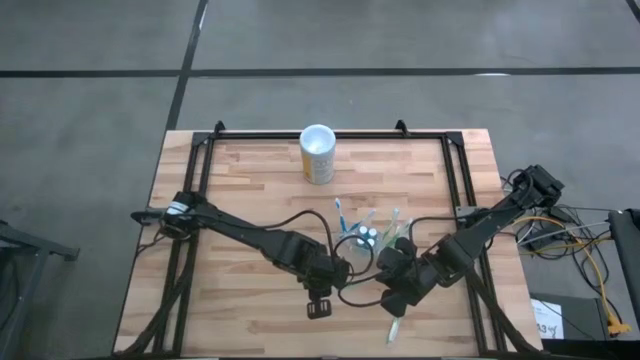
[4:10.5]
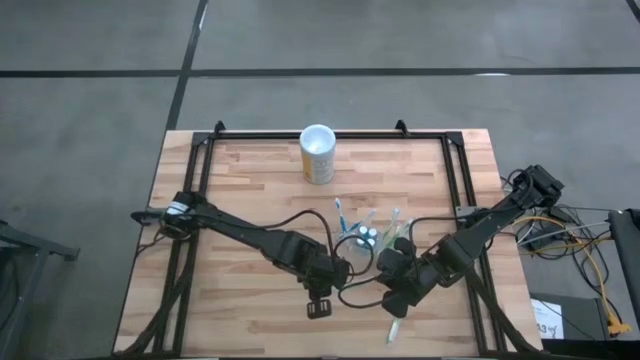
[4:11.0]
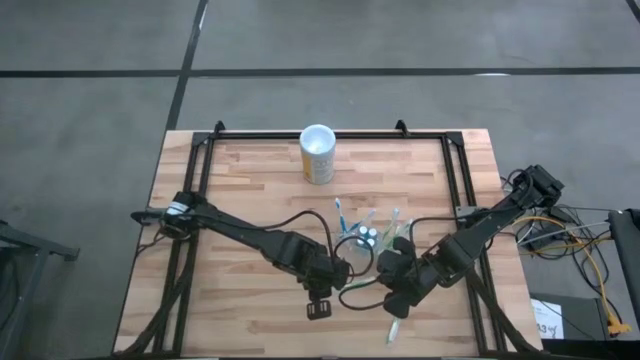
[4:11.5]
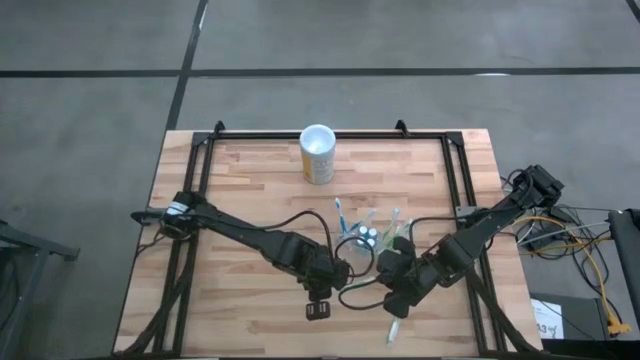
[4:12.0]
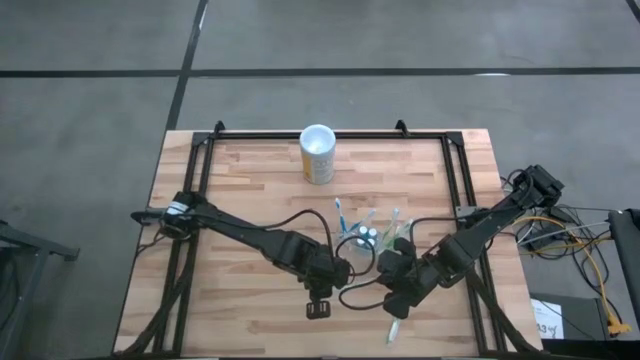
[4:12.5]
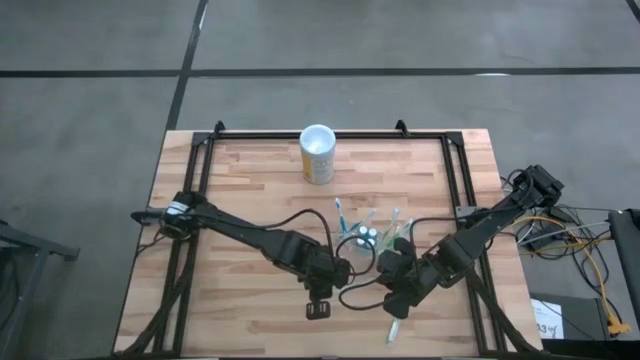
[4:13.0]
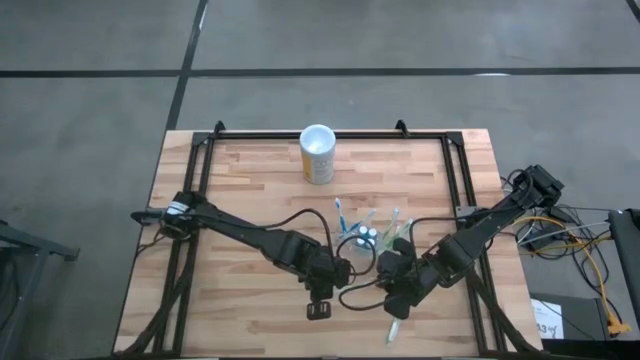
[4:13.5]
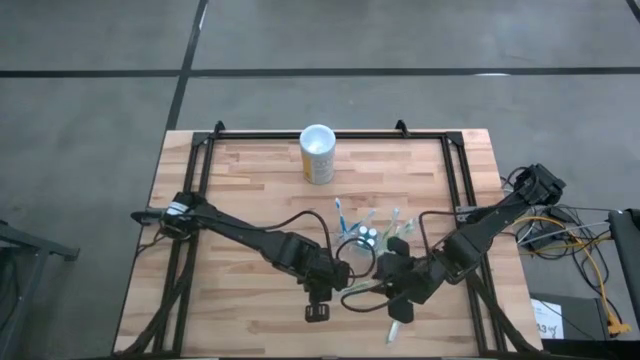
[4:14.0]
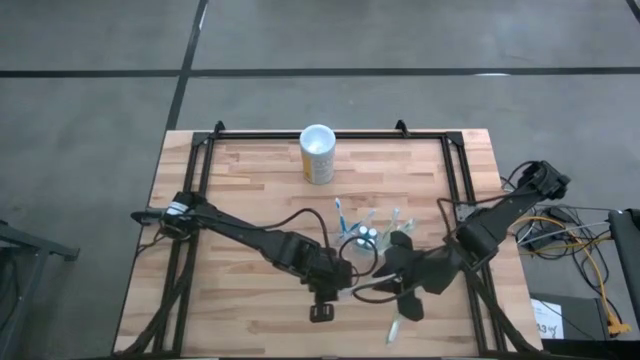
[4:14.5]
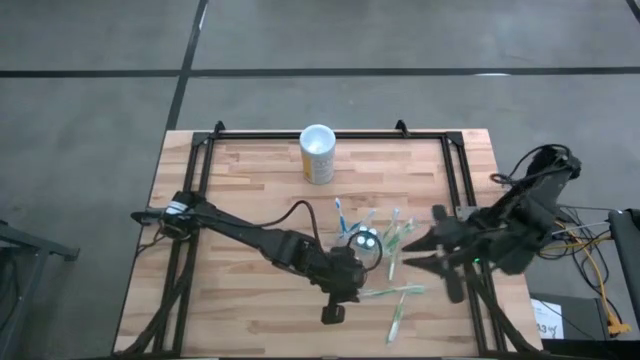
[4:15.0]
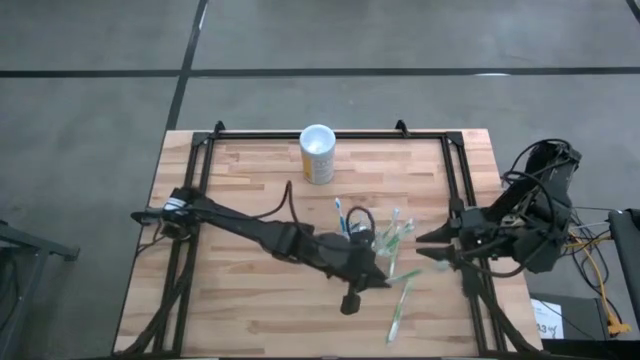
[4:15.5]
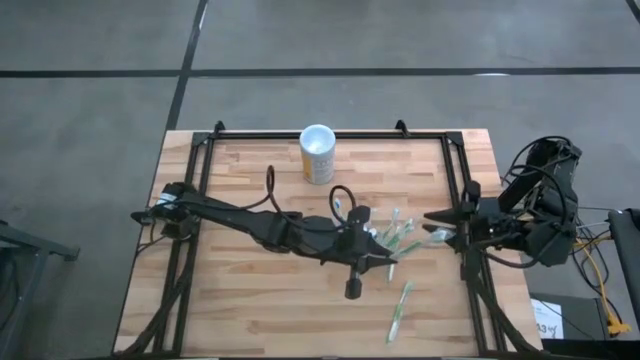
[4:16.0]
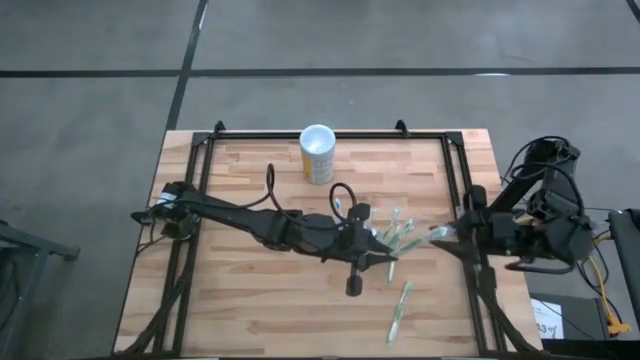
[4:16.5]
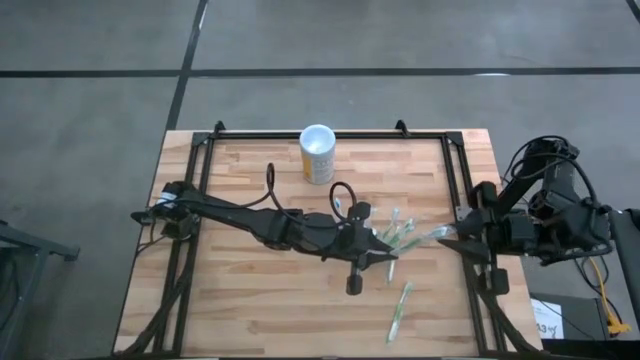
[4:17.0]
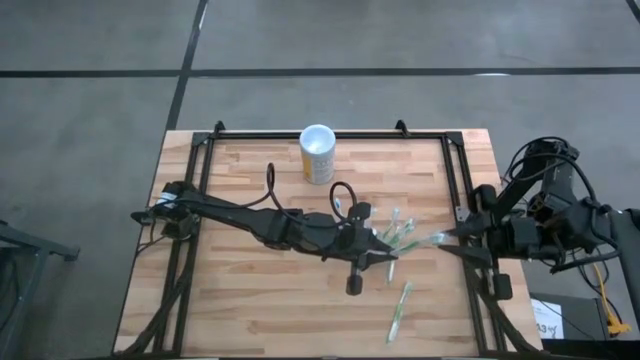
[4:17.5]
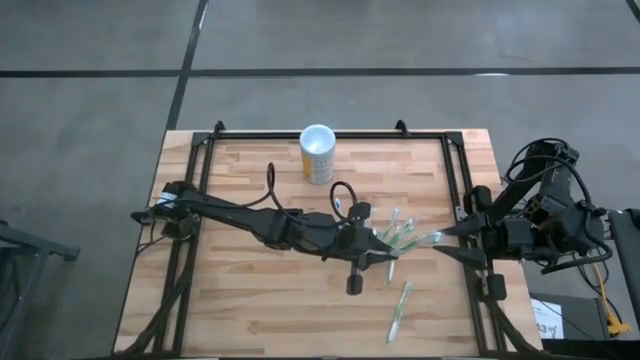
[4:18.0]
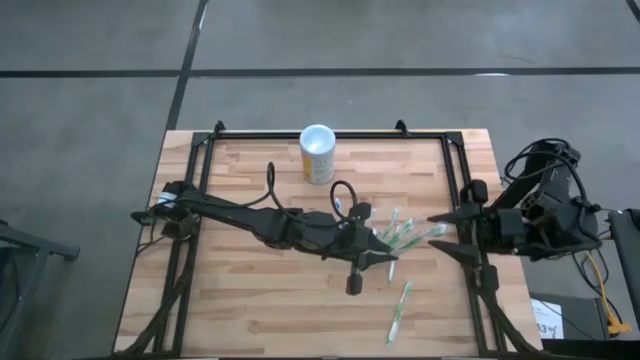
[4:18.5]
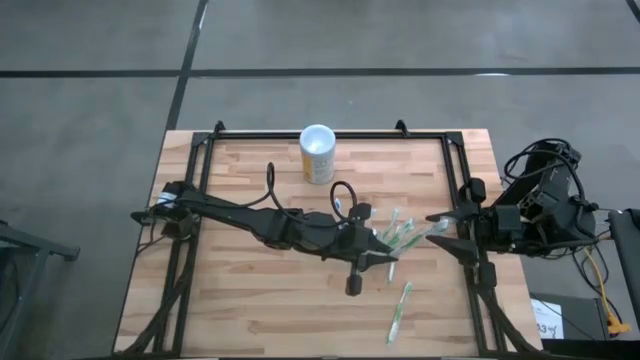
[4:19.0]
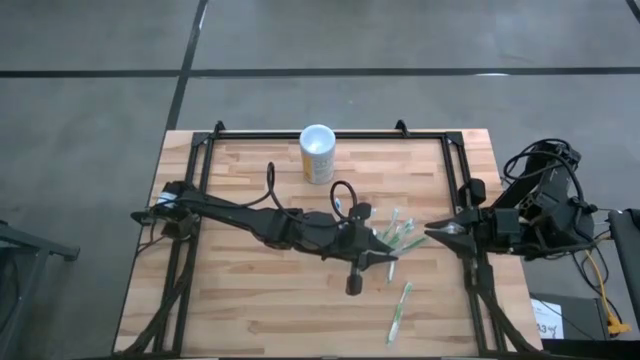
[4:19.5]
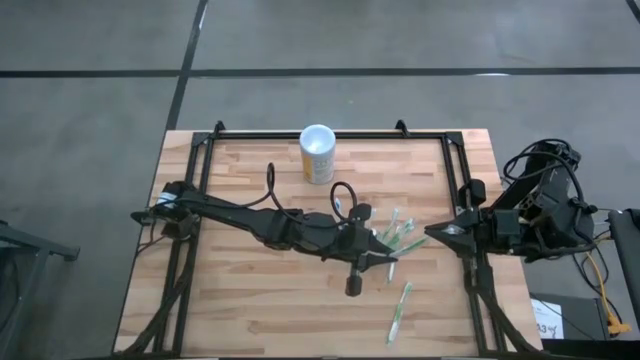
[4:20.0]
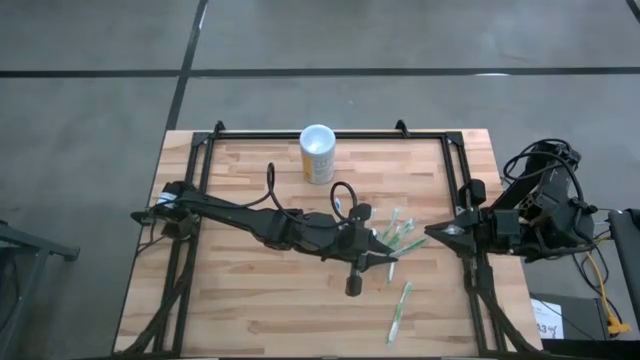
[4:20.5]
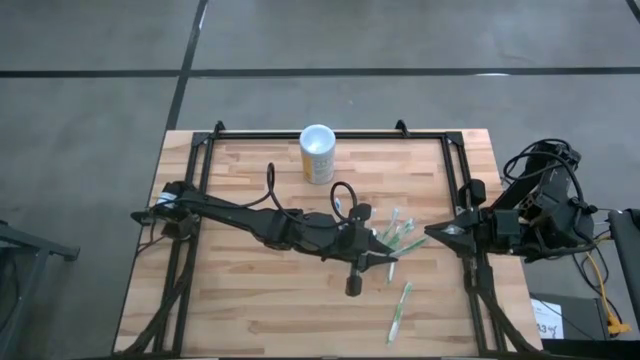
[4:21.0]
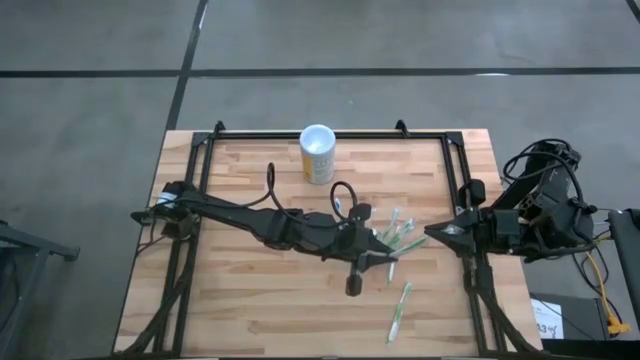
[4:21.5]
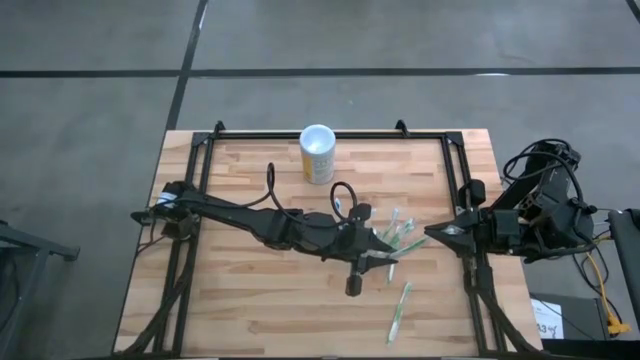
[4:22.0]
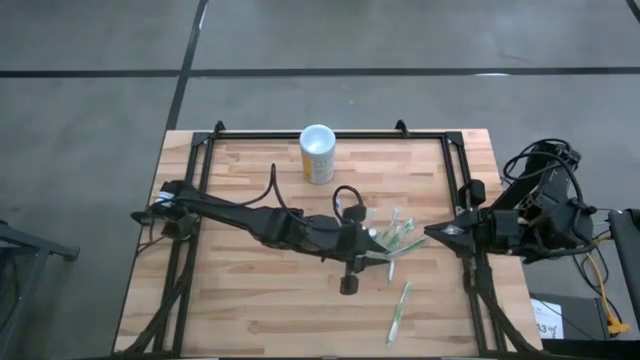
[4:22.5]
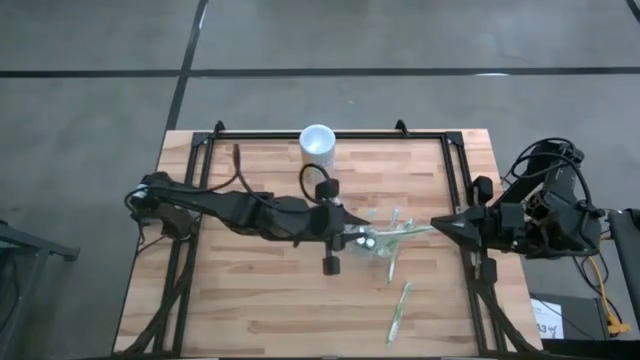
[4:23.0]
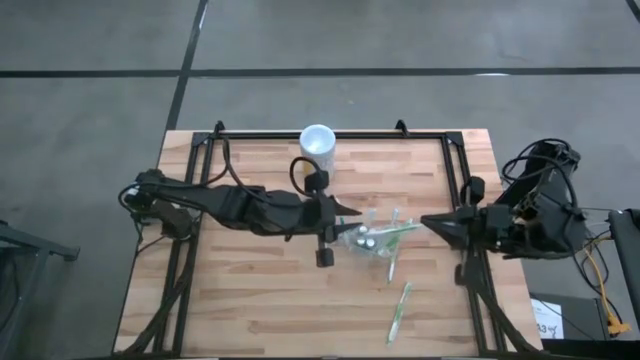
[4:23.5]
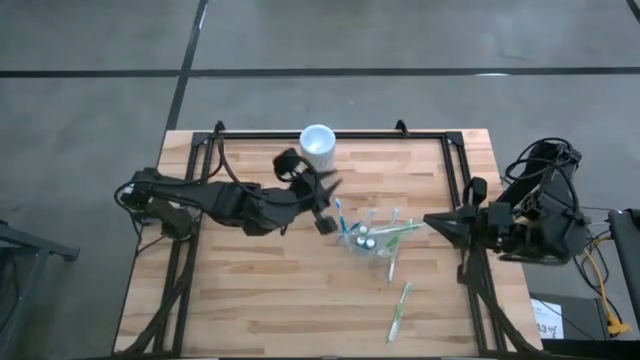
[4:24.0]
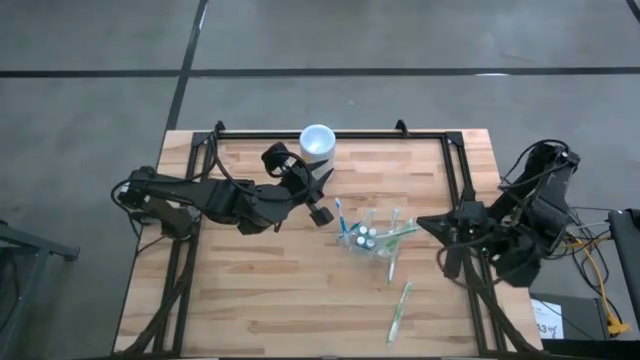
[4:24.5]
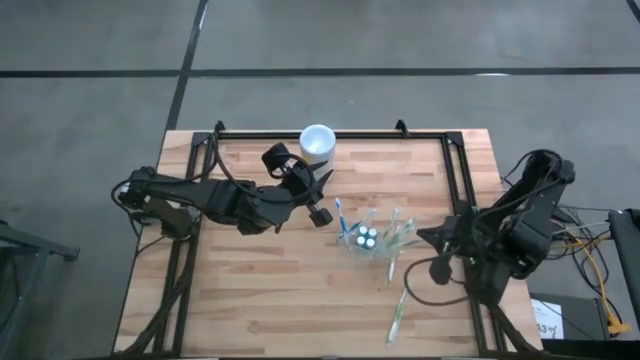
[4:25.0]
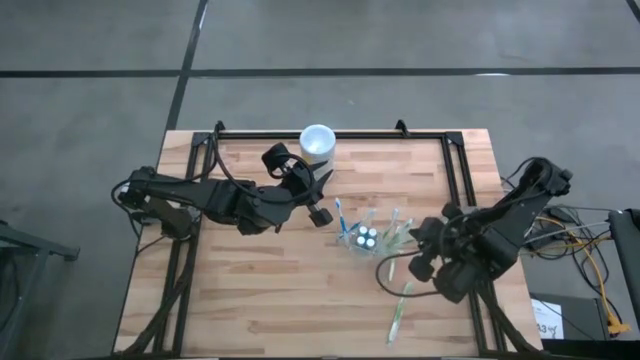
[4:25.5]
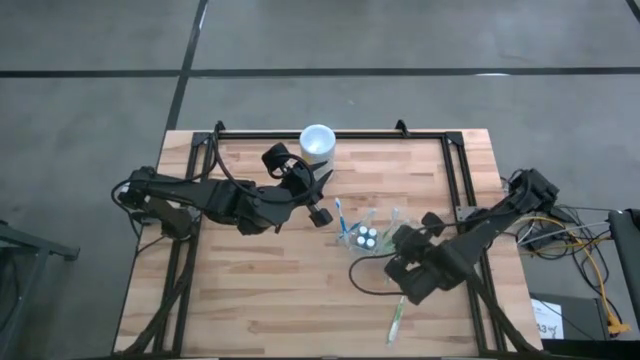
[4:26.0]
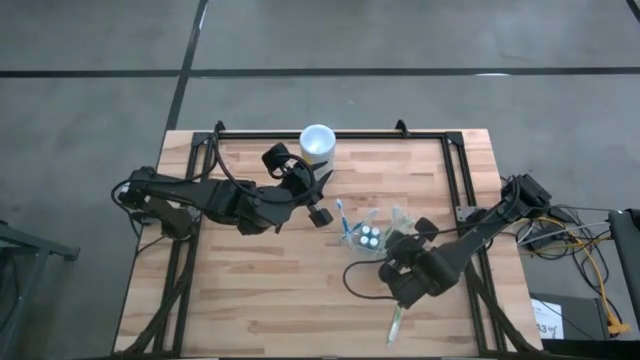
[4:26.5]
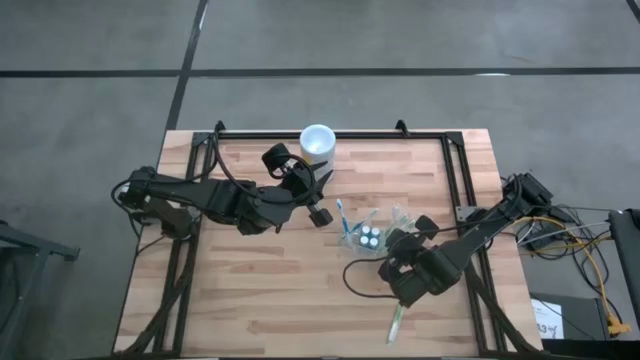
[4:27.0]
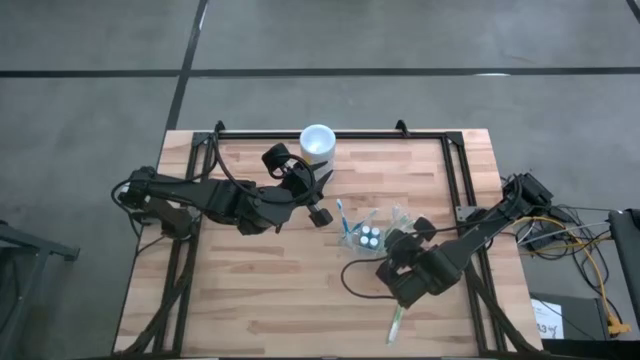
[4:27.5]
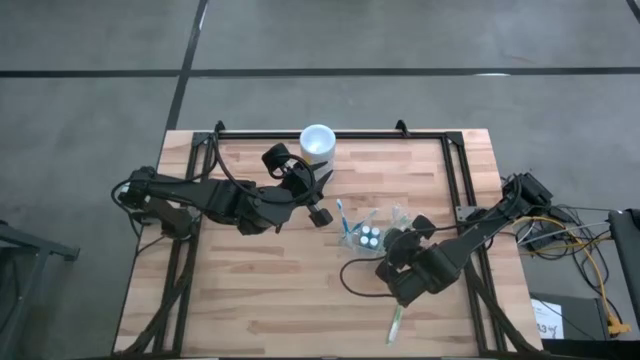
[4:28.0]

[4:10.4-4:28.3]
Task: Pick & Place toothbrushing station
Put the green toothbrush into the right section of the transparent organizer

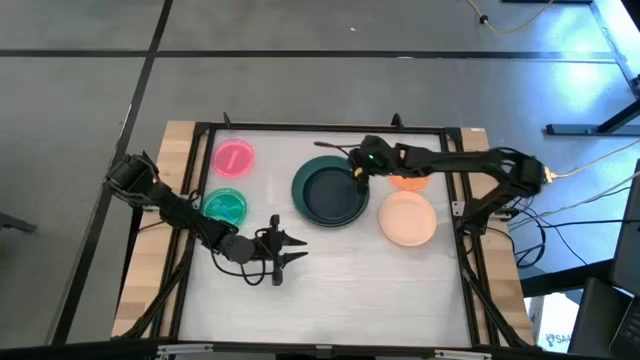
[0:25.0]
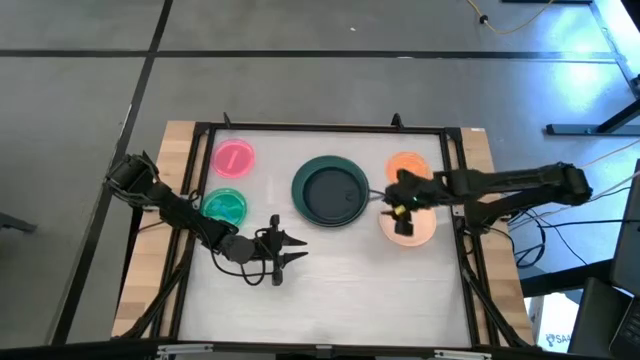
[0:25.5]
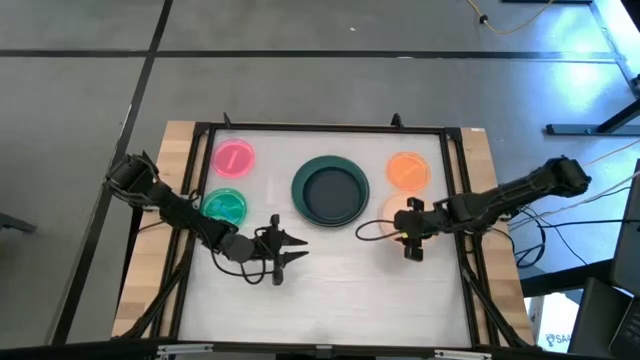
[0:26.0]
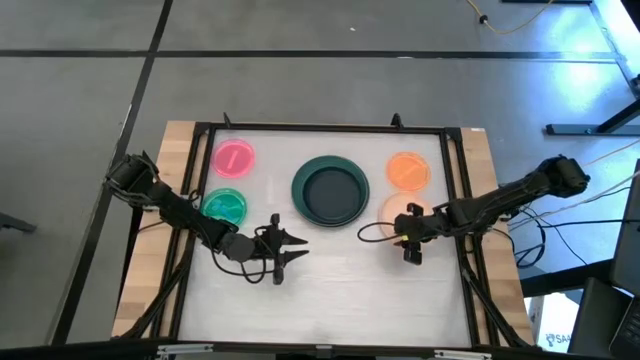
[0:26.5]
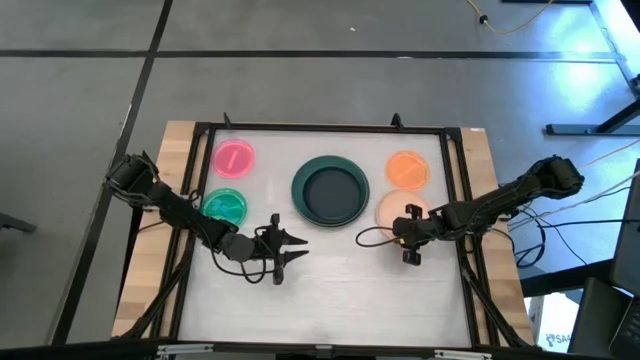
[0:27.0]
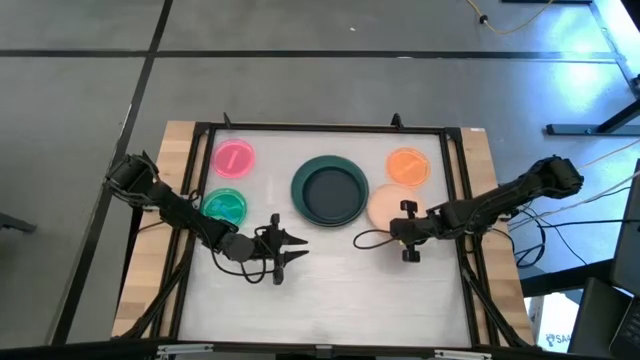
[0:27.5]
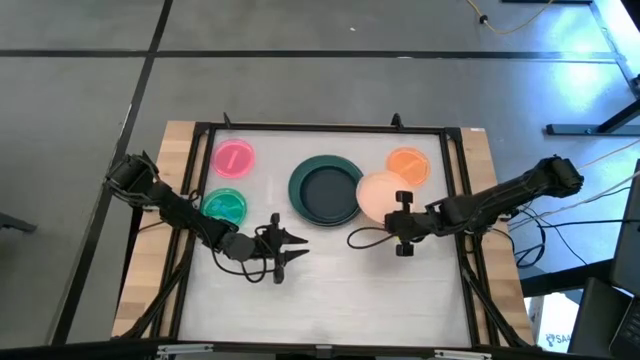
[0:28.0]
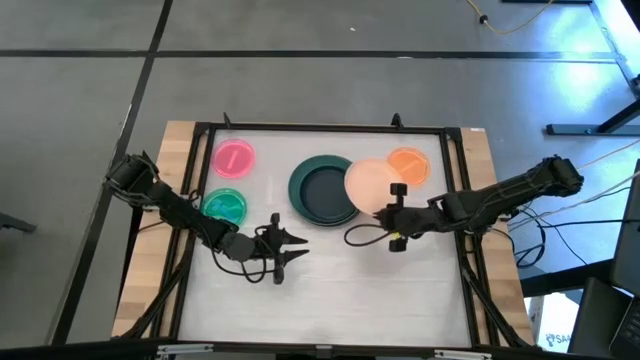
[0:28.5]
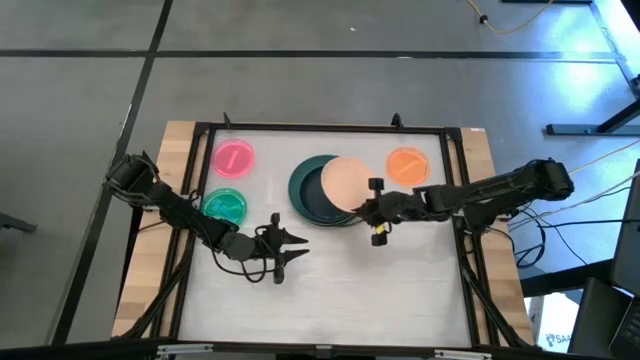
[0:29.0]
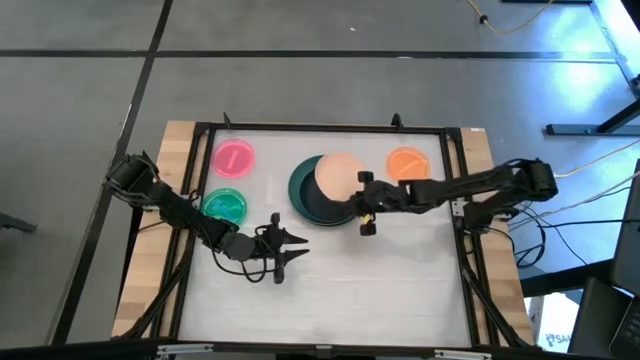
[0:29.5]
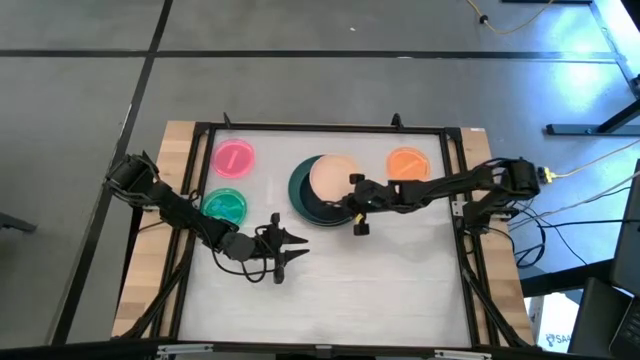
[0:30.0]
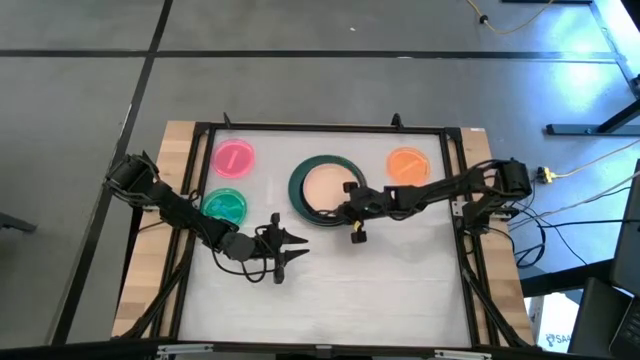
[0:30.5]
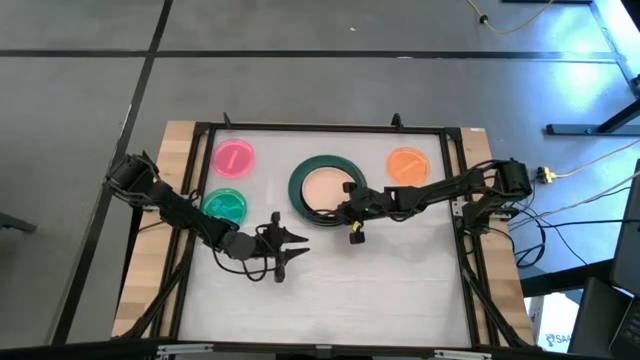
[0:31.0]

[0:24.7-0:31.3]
Task: Stack plastic plates
Stack the orange plate on the black plate
